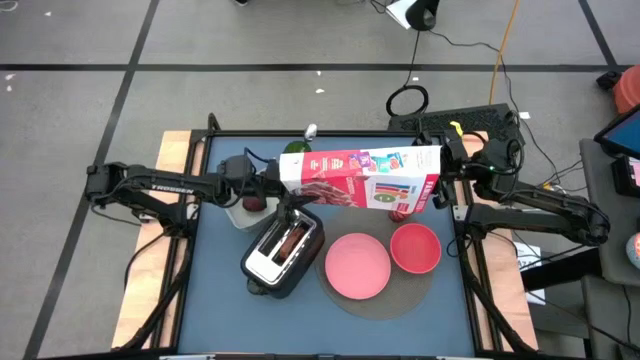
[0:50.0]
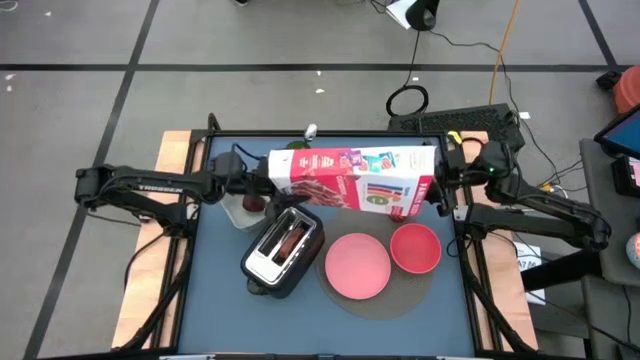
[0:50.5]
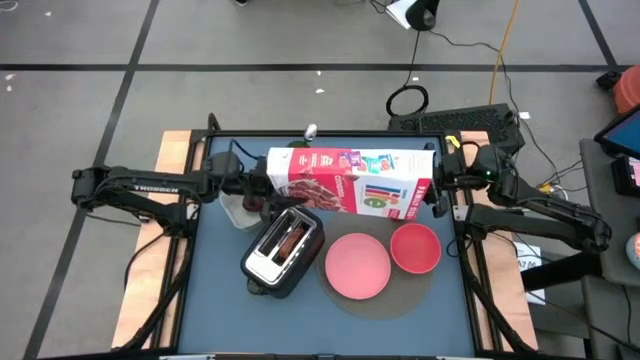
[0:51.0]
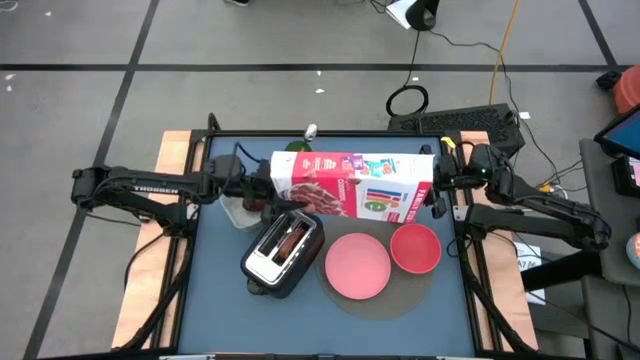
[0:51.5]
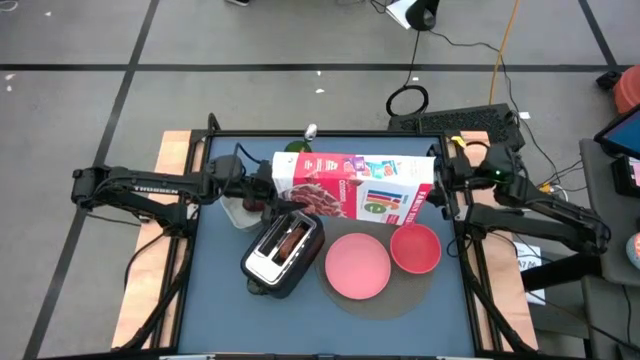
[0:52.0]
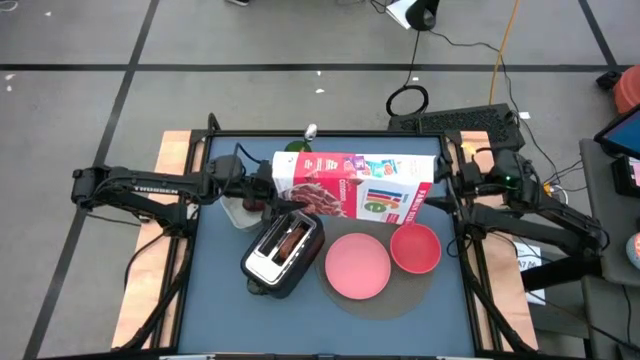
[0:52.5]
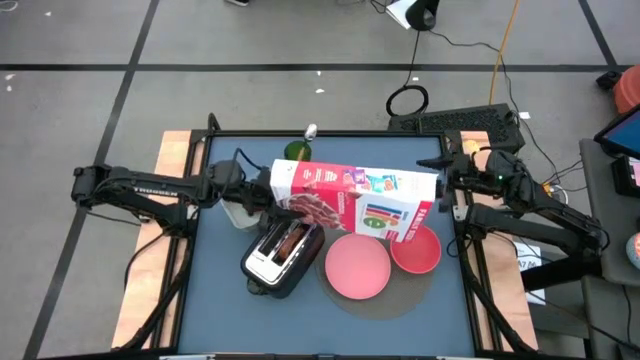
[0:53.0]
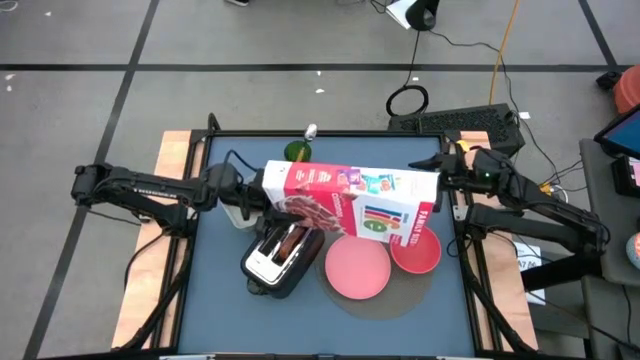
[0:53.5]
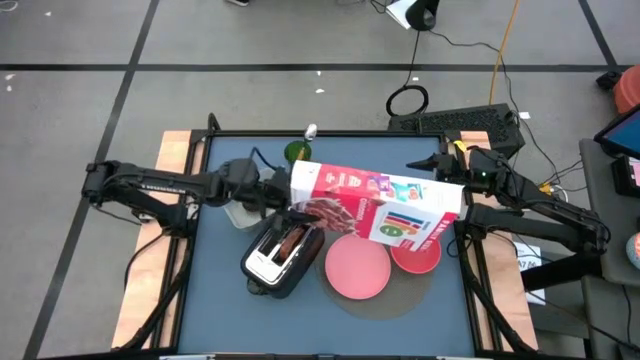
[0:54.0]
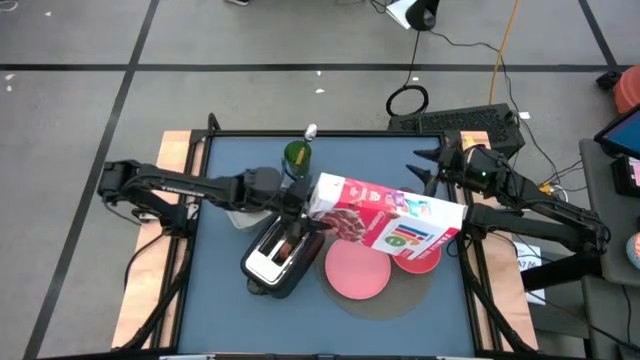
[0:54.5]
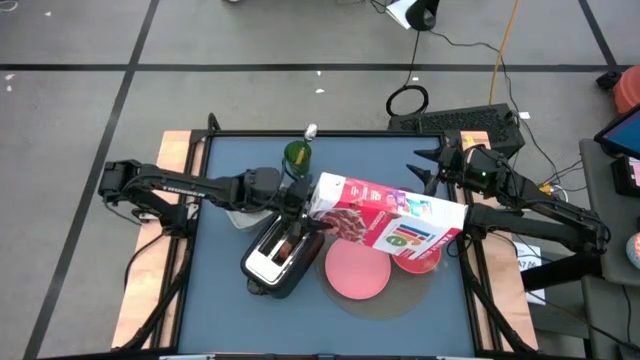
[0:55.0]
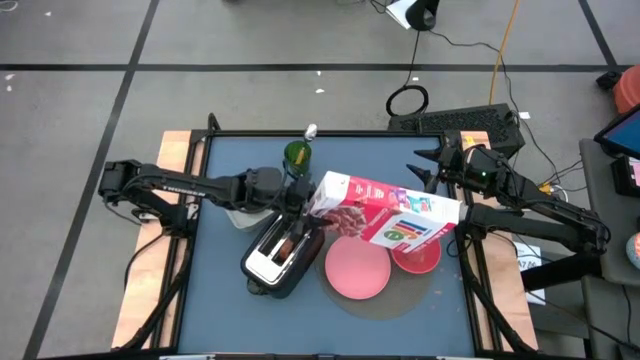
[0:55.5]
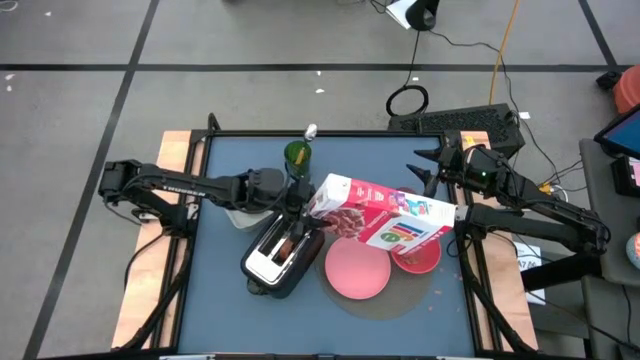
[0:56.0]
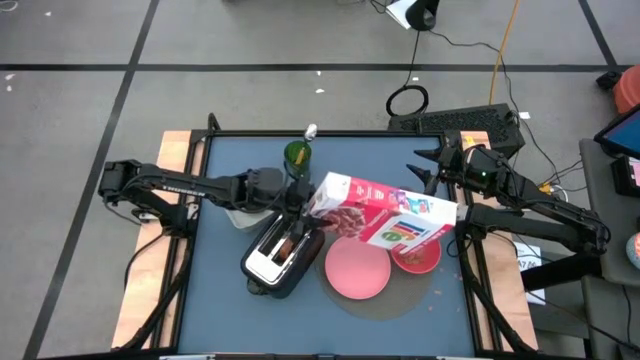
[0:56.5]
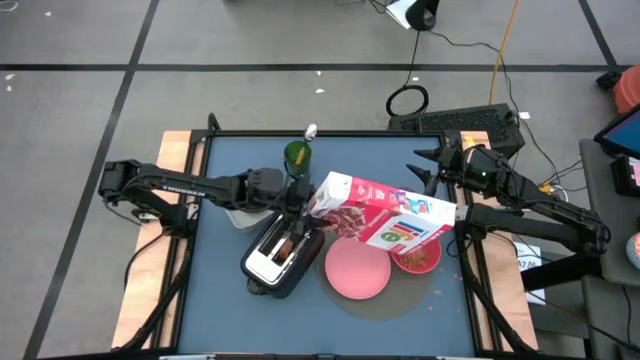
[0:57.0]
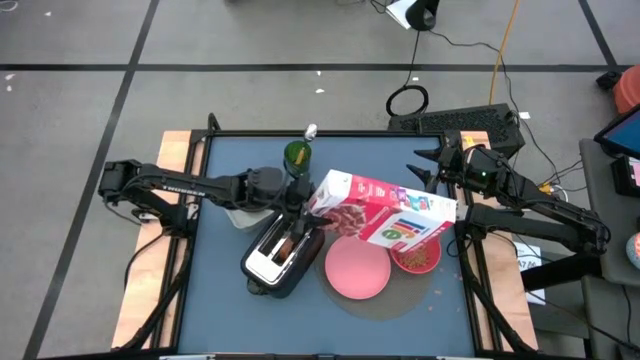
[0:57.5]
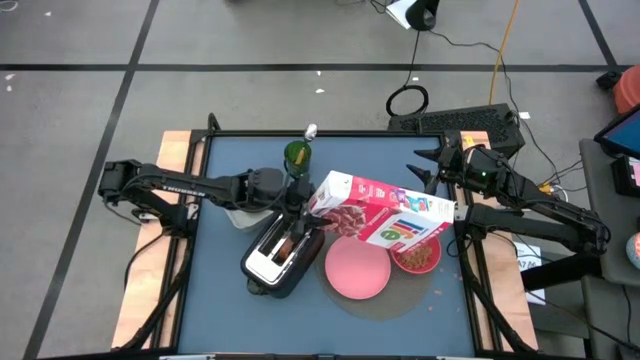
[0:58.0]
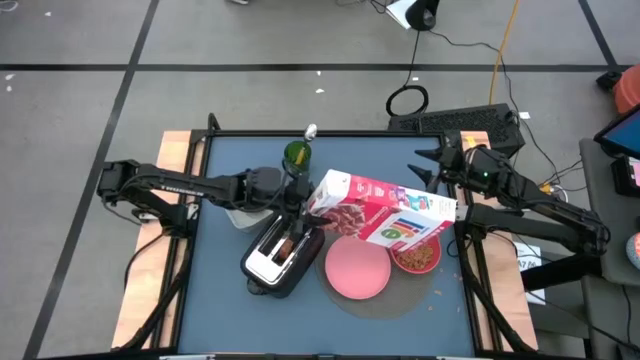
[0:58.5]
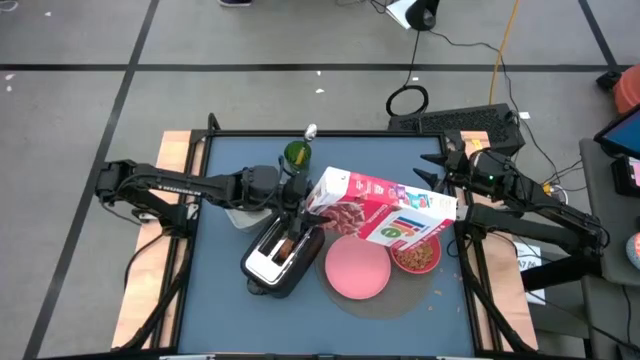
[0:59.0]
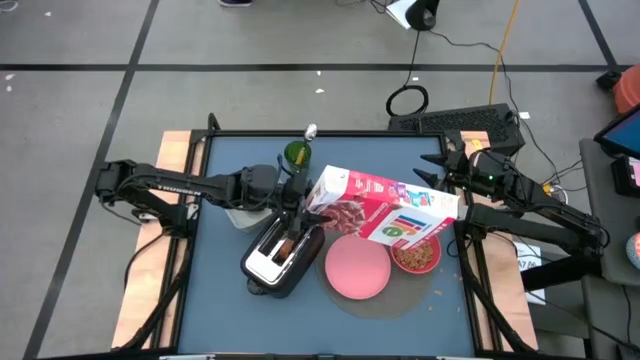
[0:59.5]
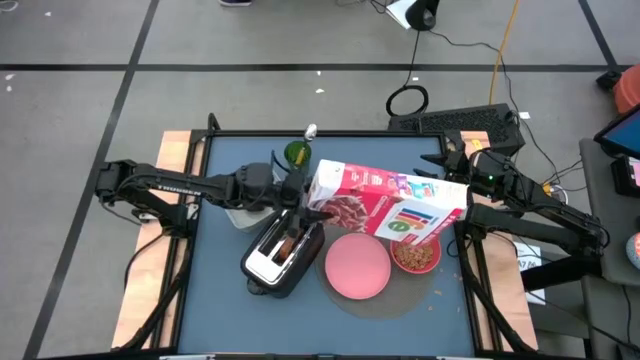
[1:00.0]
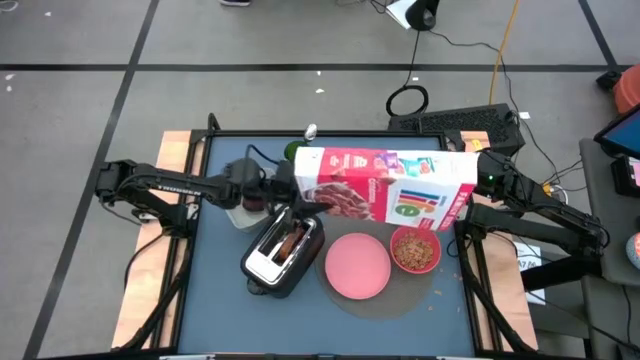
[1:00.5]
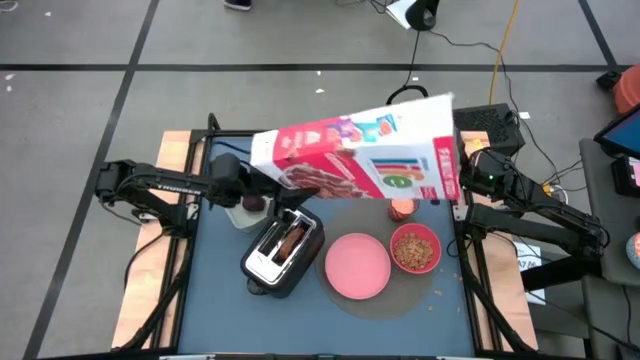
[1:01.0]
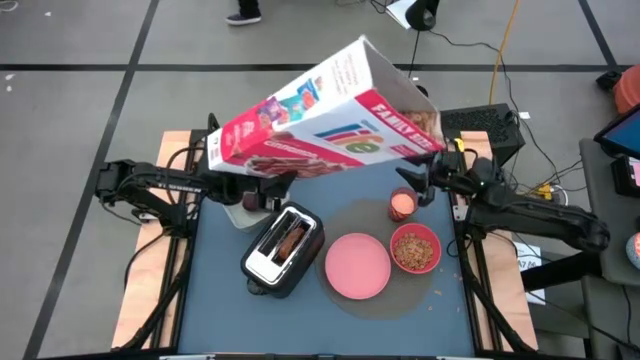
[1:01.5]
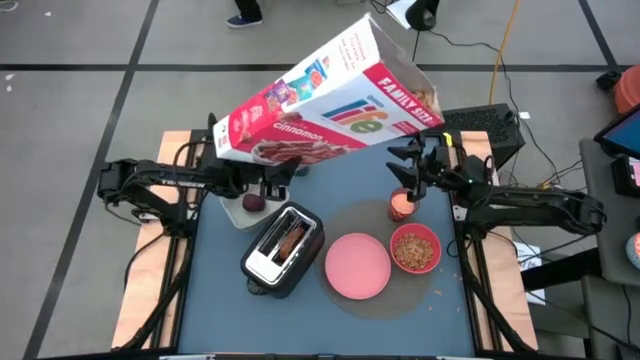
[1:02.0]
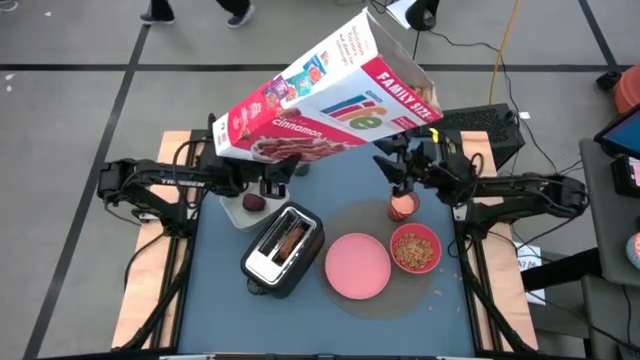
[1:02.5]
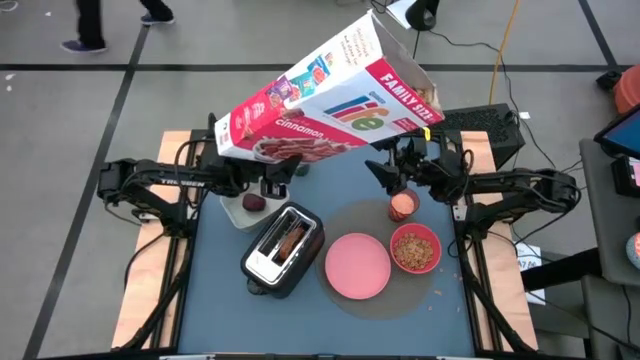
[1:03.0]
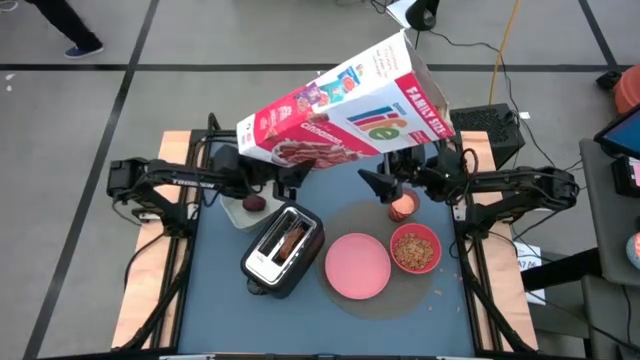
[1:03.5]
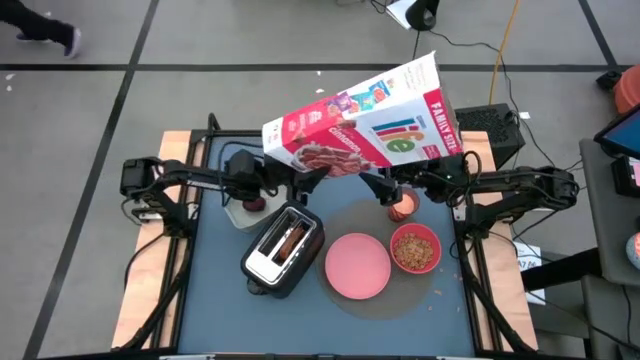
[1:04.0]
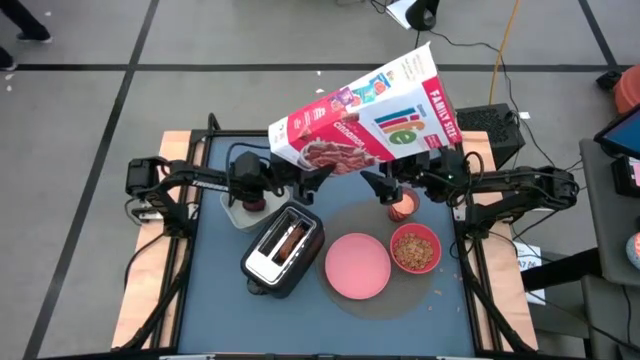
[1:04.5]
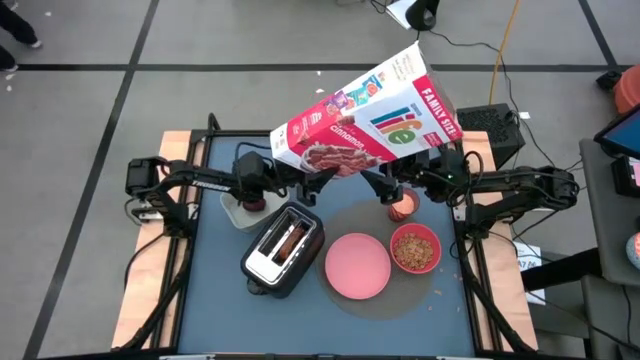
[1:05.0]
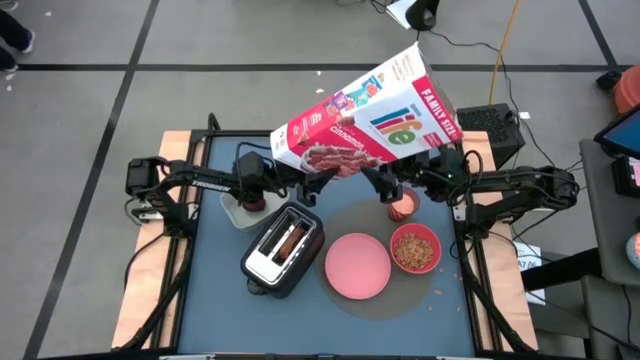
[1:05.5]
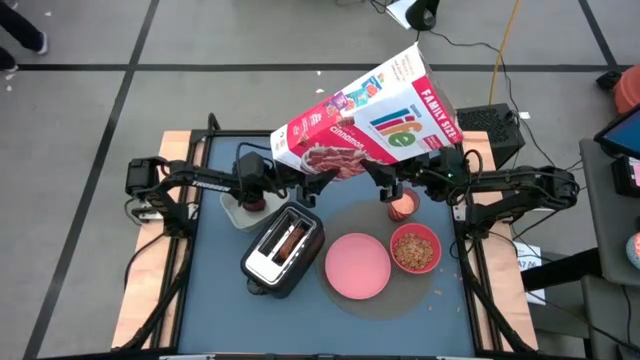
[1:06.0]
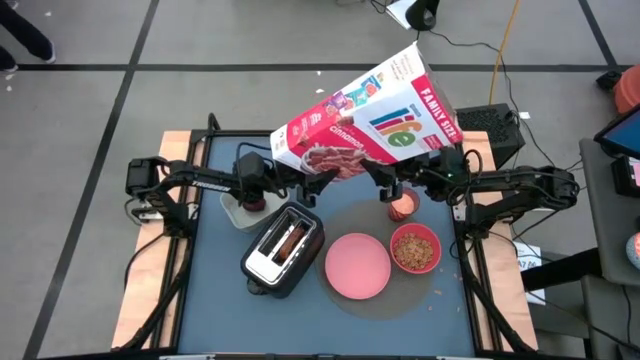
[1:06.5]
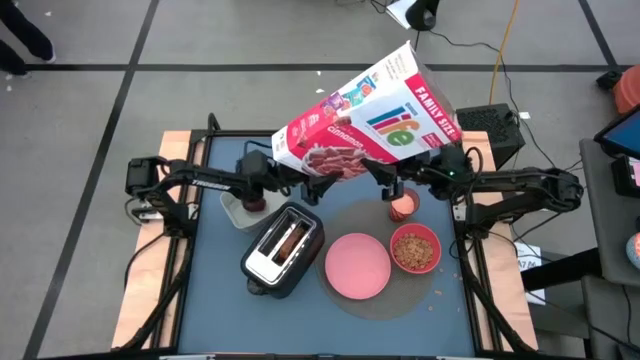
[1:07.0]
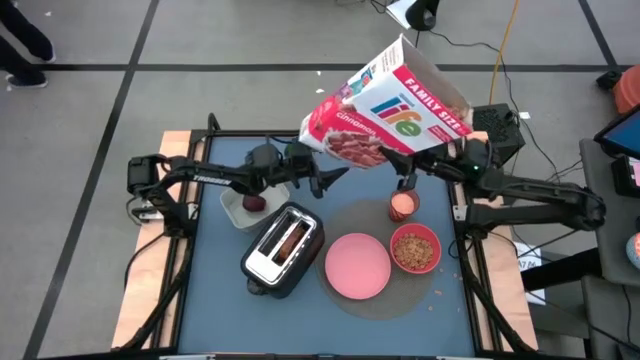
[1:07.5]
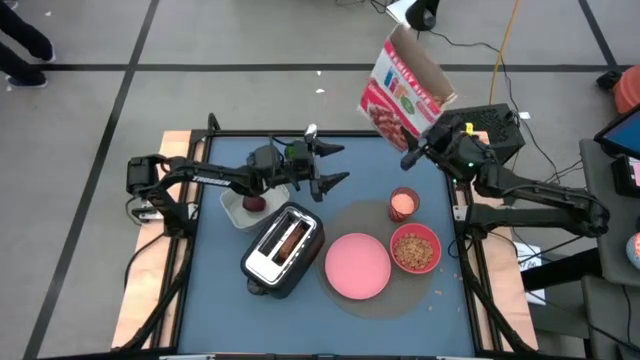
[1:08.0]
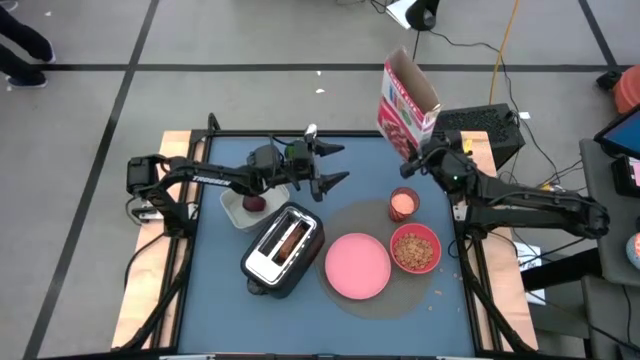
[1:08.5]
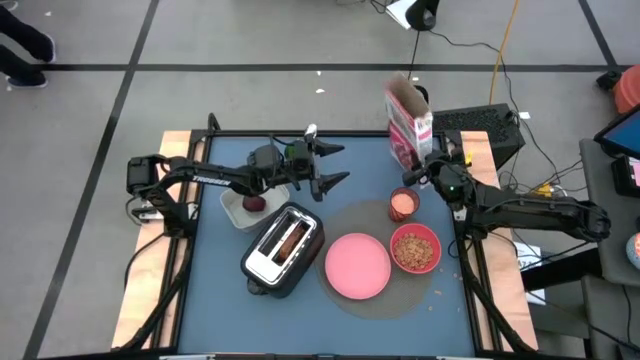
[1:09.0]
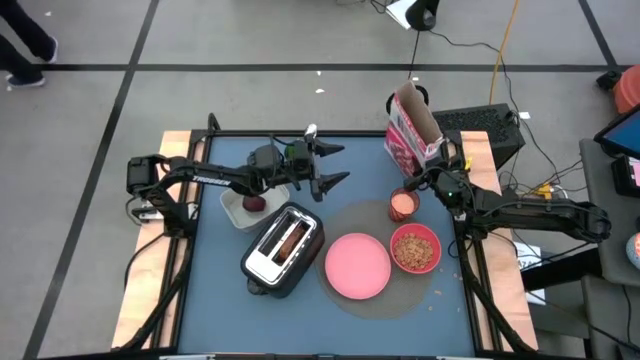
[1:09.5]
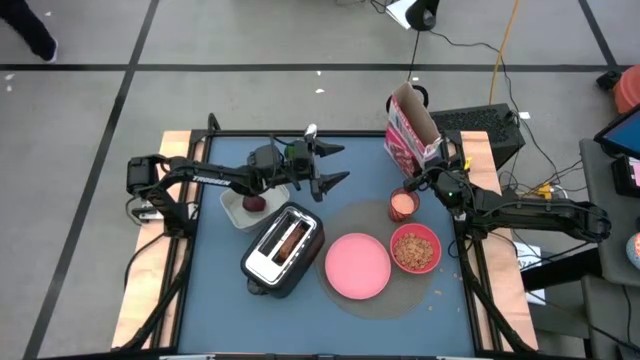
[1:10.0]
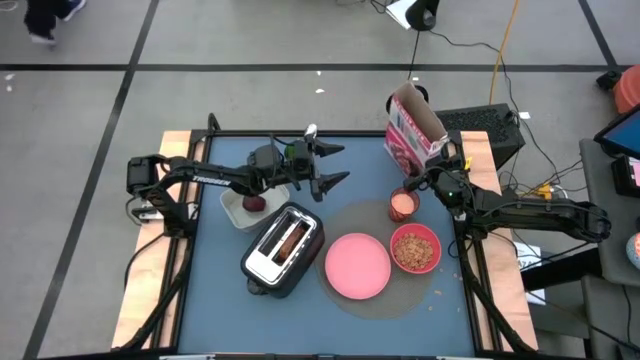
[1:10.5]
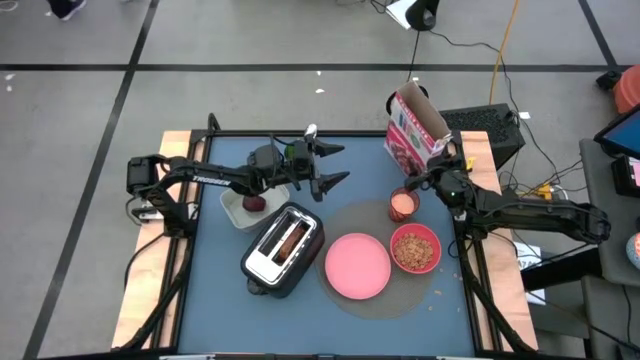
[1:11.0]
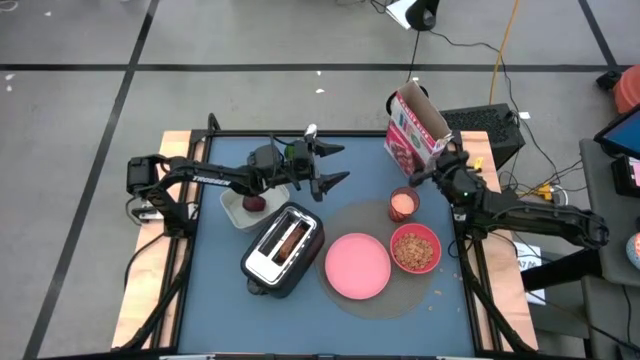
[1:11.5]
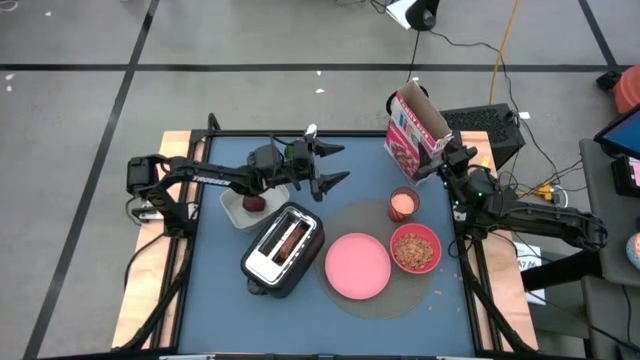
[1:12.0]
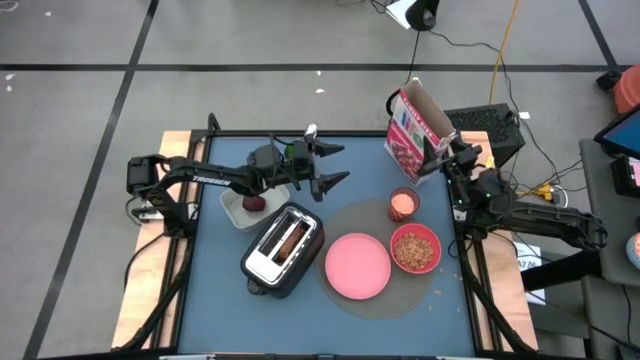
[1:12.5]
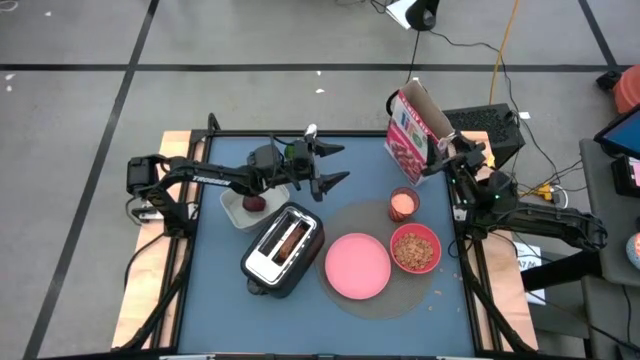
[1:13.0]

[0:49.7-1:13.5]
Task: Arrange a breakfast setting
Pour the cereal from the cereal box into the red bowl
